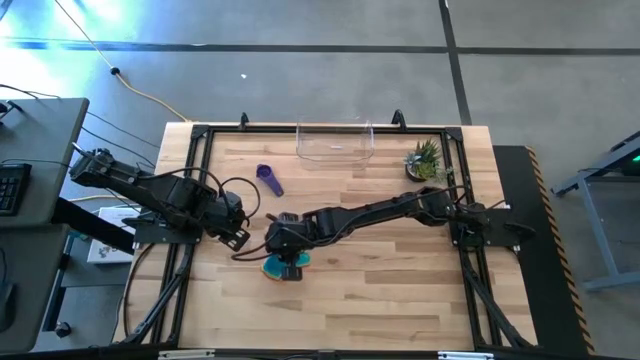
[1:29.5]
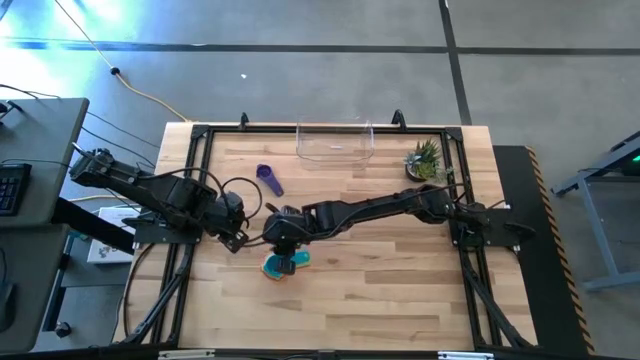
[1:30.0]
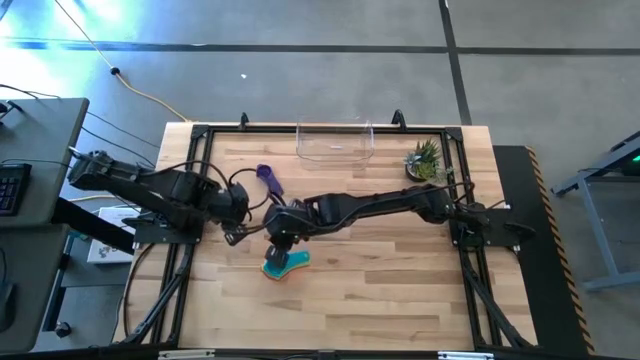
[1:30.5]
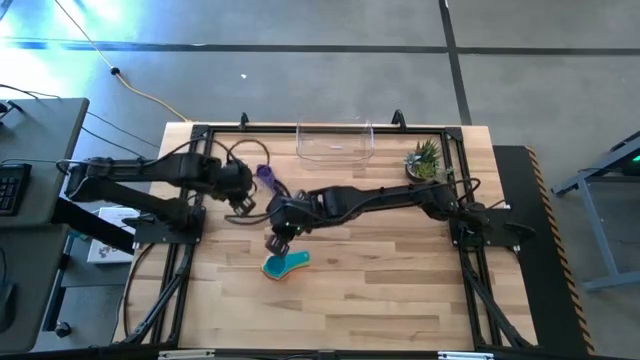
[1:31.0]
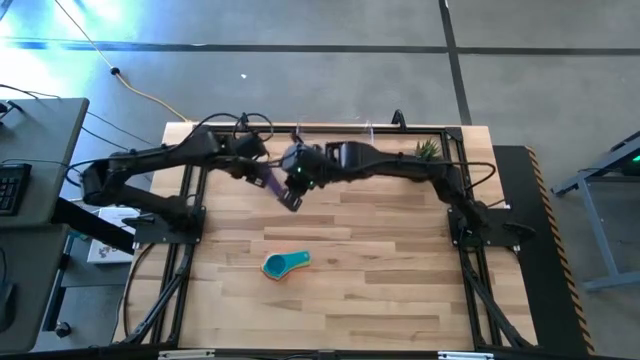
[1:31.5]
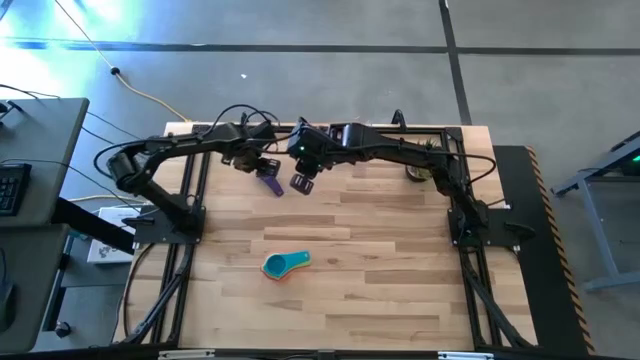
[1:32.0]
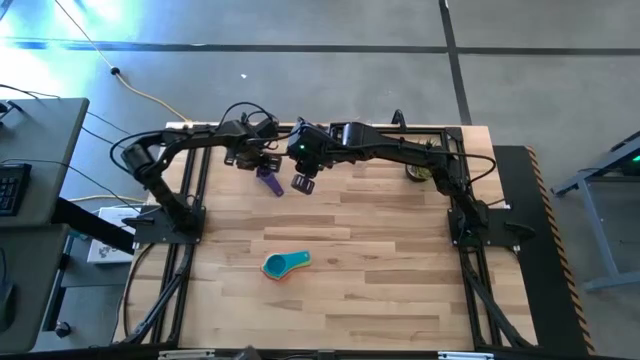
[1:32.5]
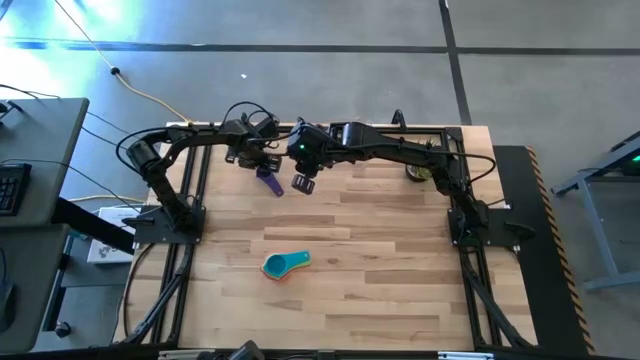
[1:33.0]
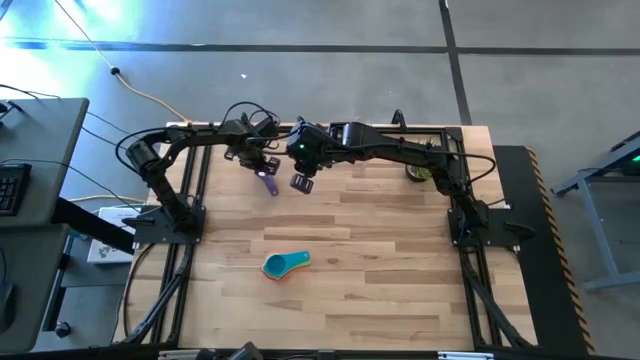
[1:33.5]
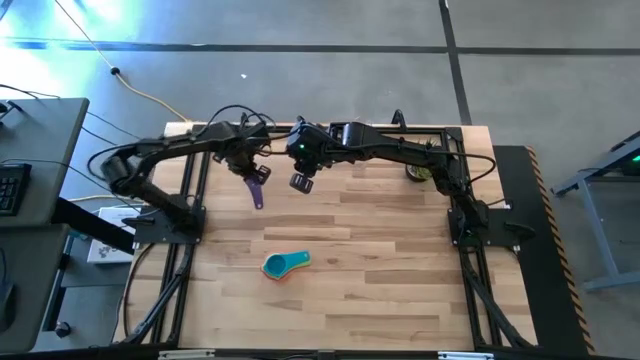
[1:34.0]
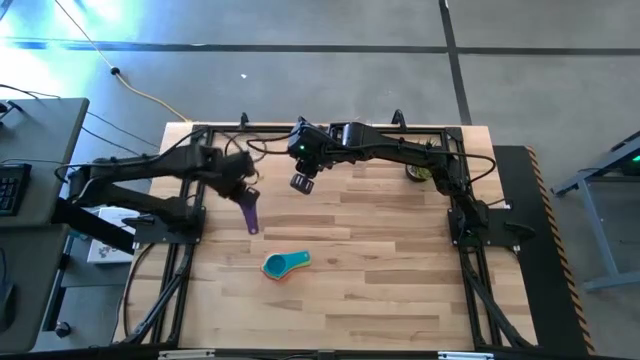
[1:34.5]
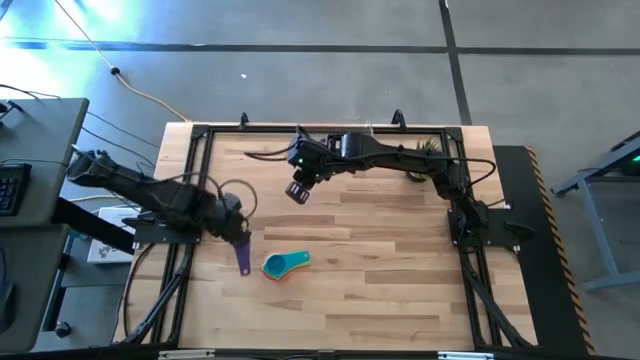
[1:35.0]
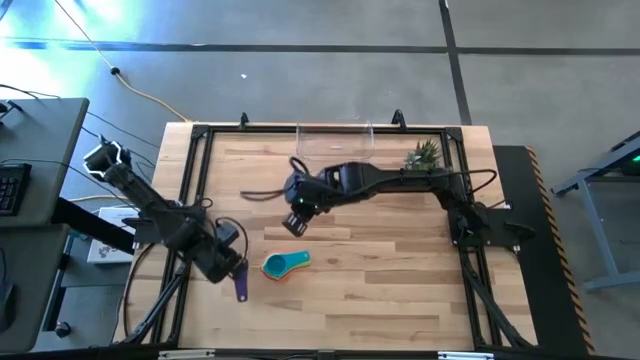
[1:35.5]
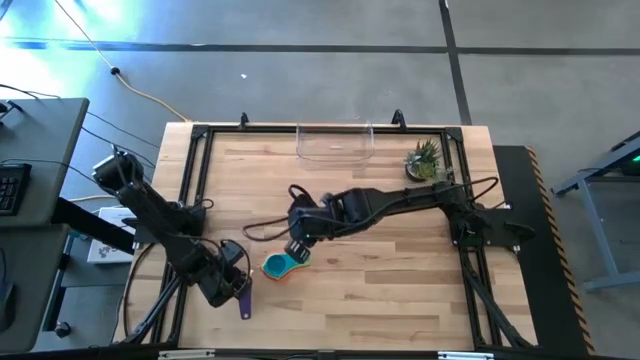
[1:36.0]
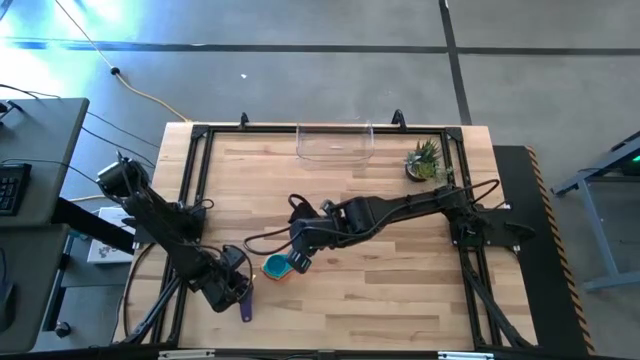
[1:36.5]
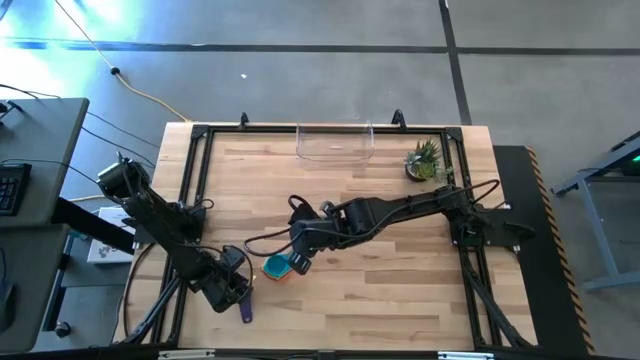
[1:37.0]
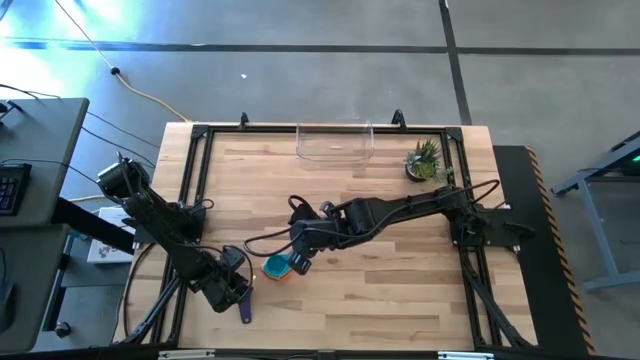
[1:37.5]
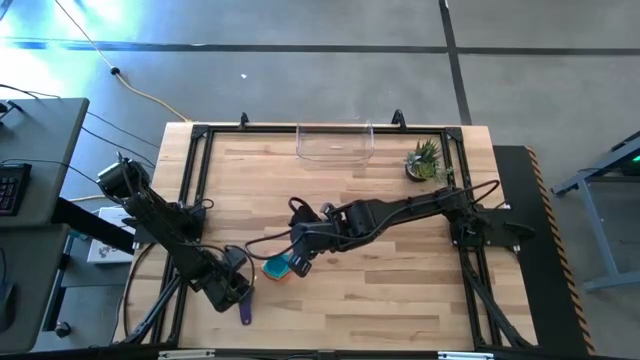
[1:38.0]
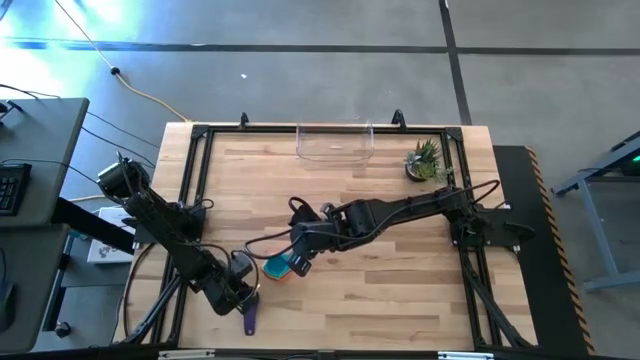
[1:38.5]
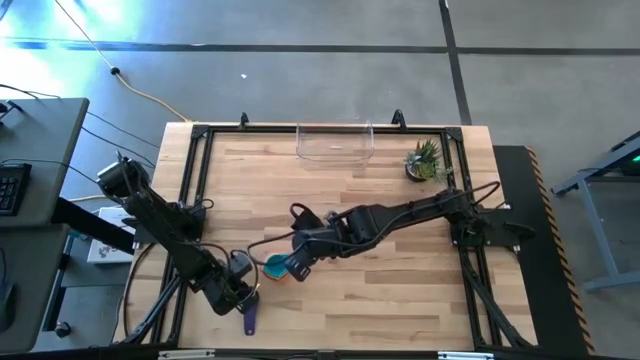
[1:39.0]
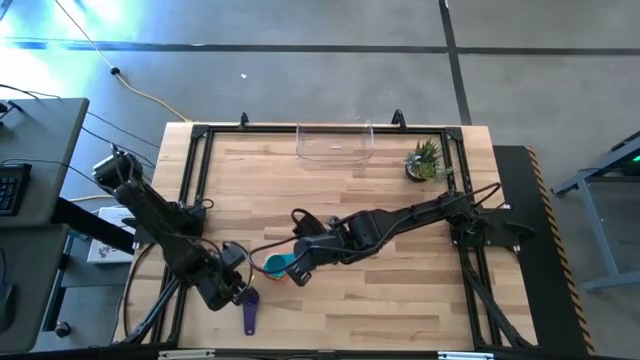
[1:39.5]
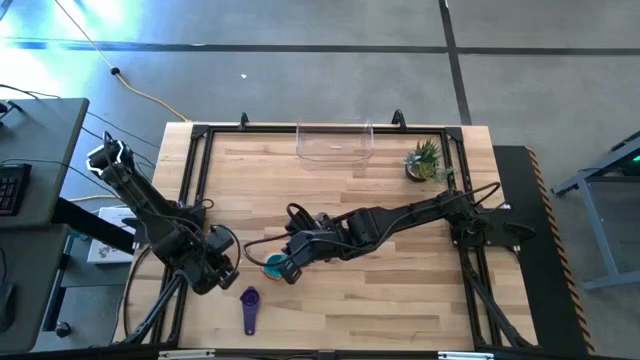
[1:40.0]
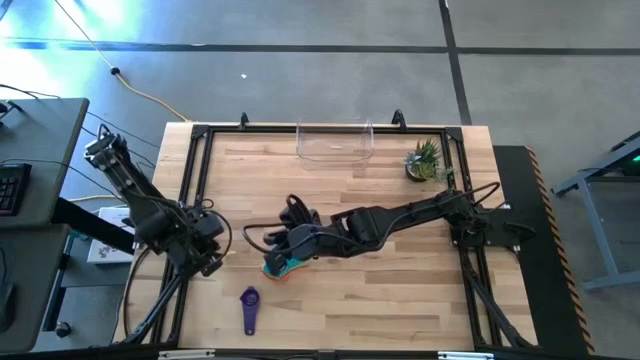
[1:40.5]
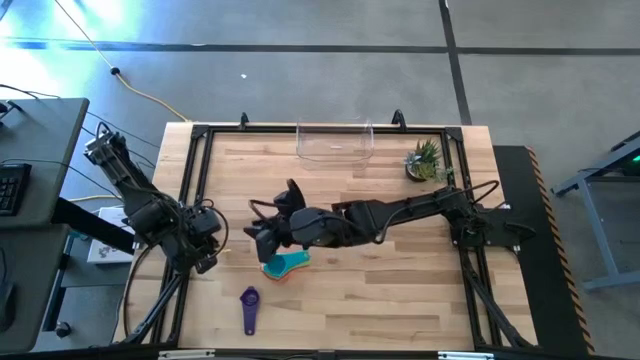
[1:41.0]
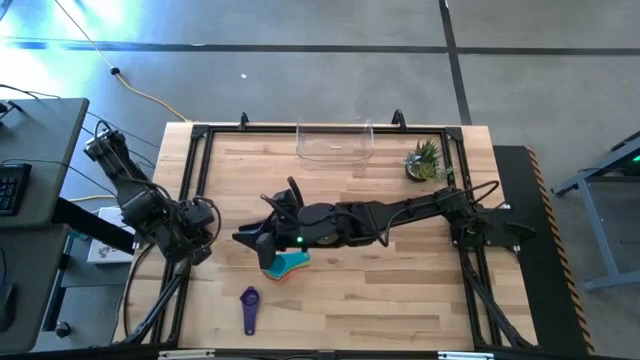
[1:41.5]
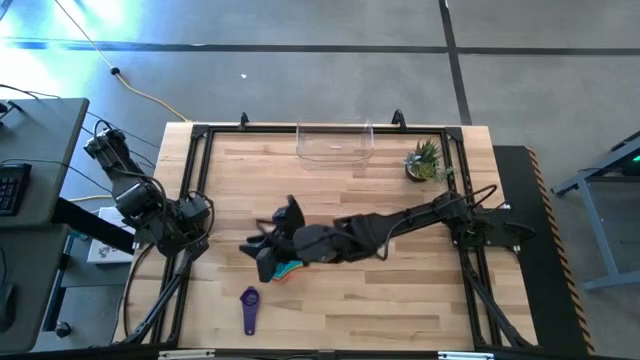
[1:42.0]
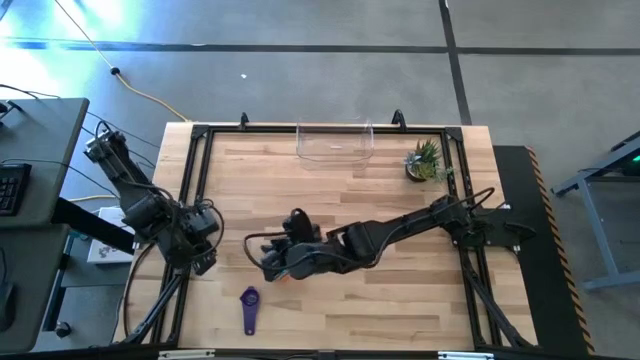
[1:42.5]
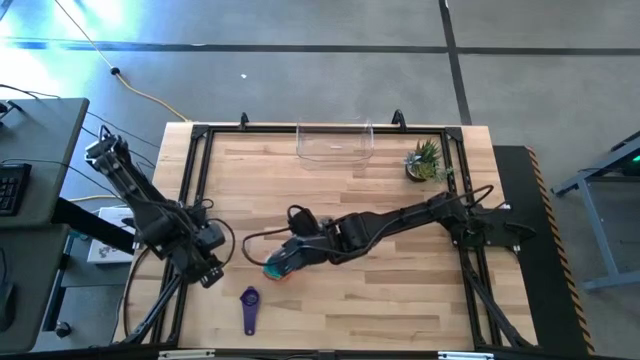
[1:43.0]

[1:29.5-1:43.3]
Task: Nest measuring cups in basket
Stack the dark blue measuring cup on top of the light blue measuring cup

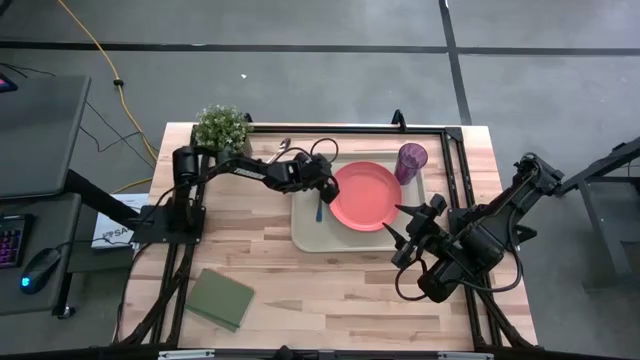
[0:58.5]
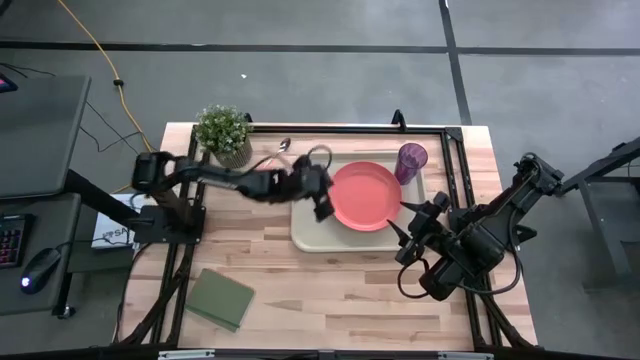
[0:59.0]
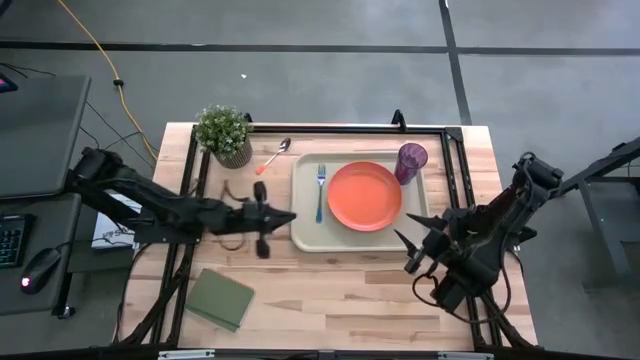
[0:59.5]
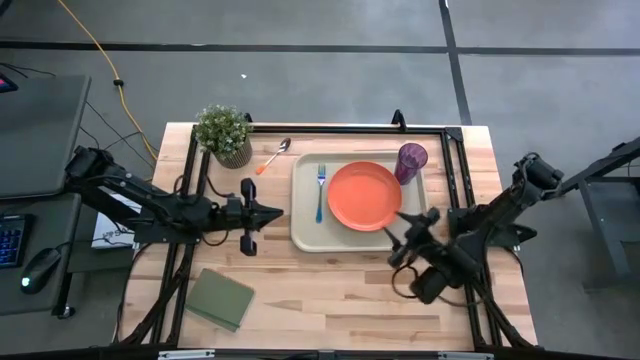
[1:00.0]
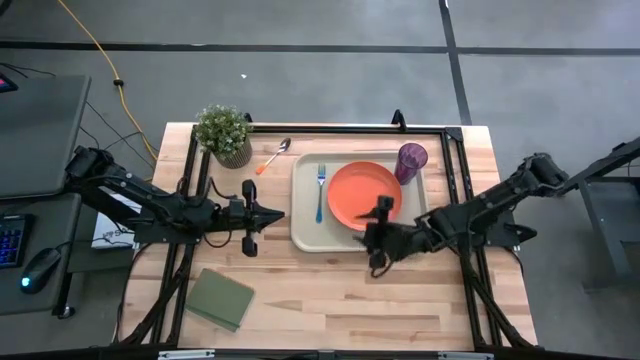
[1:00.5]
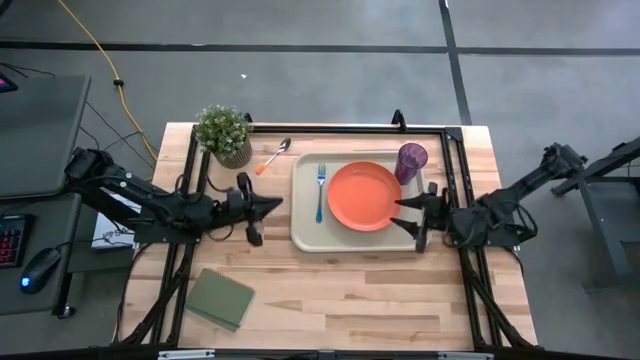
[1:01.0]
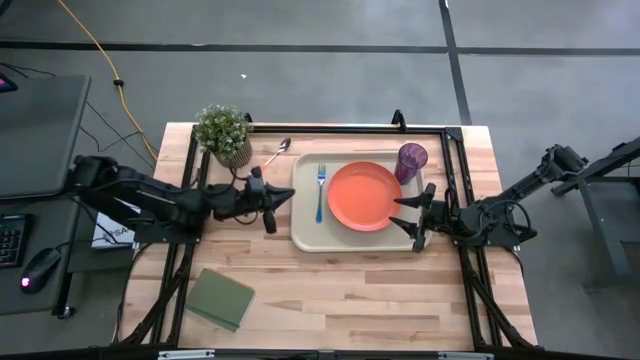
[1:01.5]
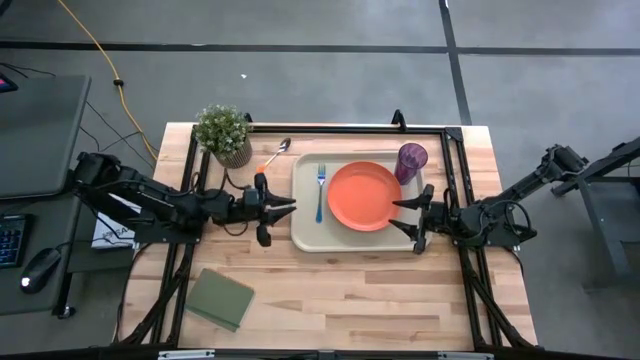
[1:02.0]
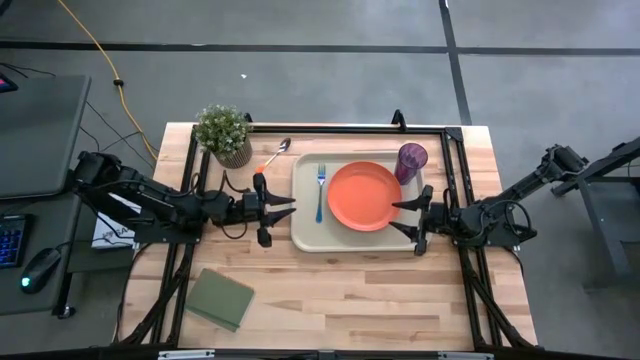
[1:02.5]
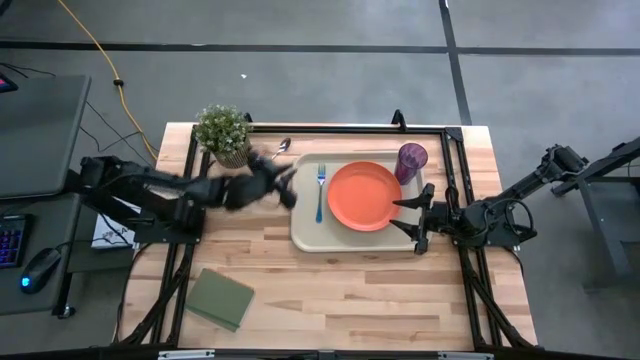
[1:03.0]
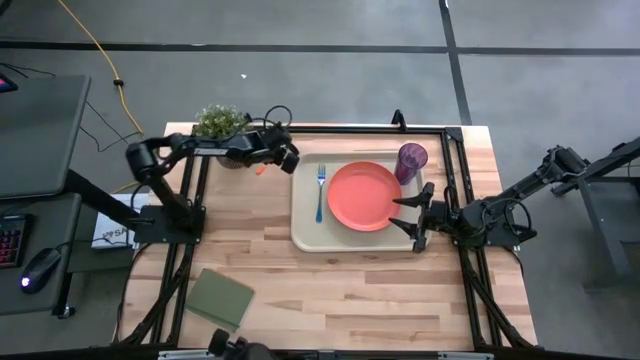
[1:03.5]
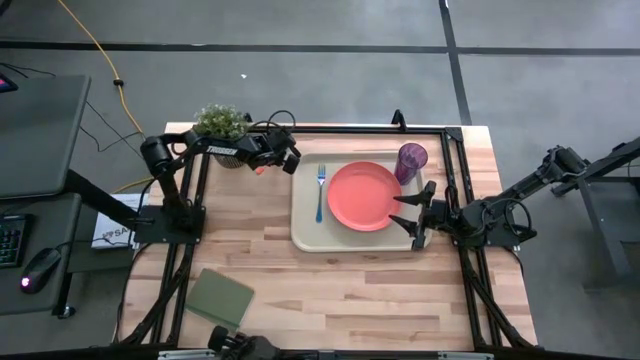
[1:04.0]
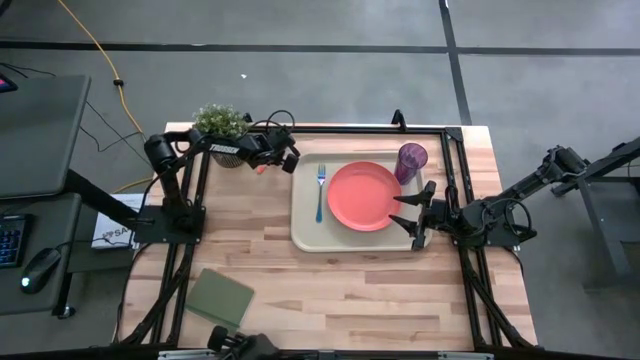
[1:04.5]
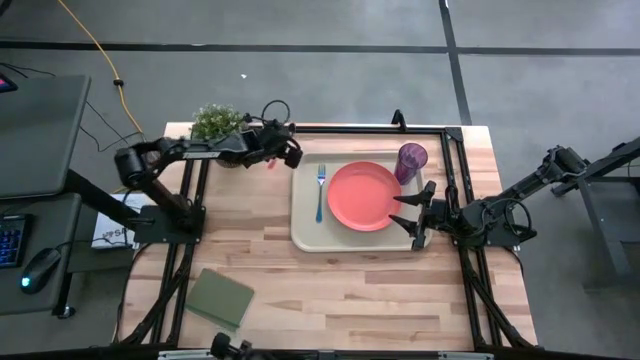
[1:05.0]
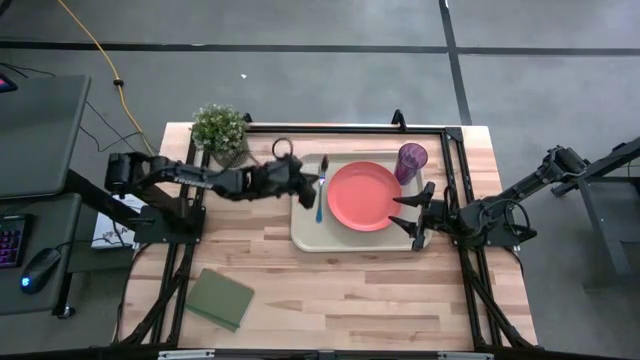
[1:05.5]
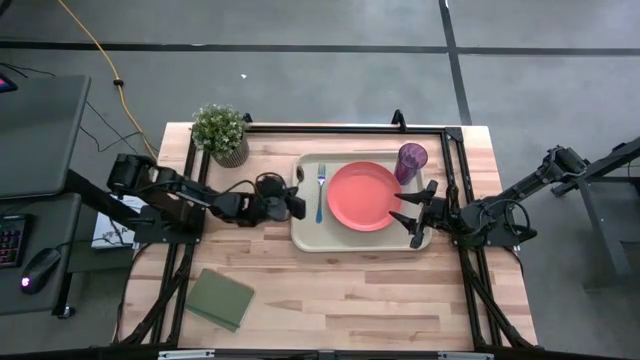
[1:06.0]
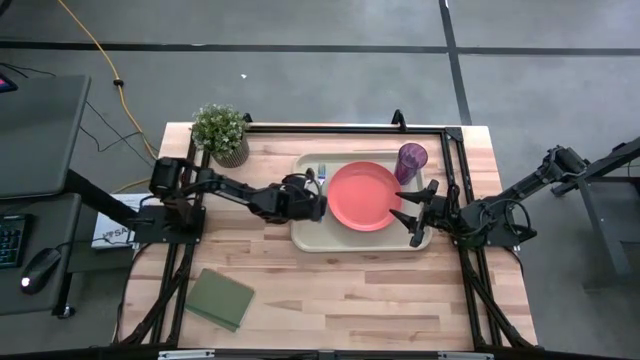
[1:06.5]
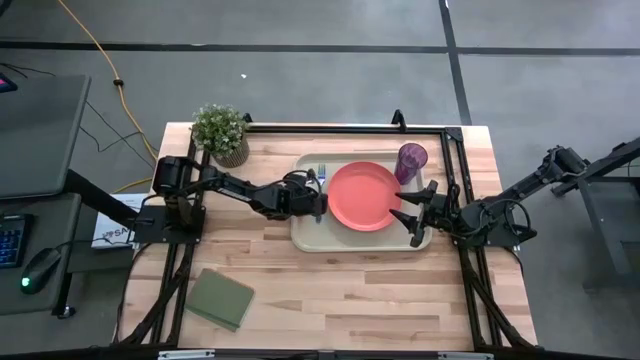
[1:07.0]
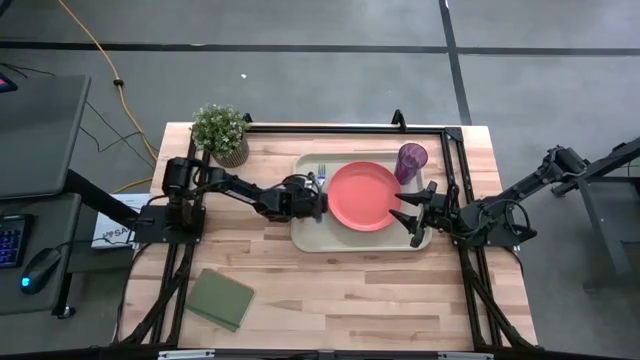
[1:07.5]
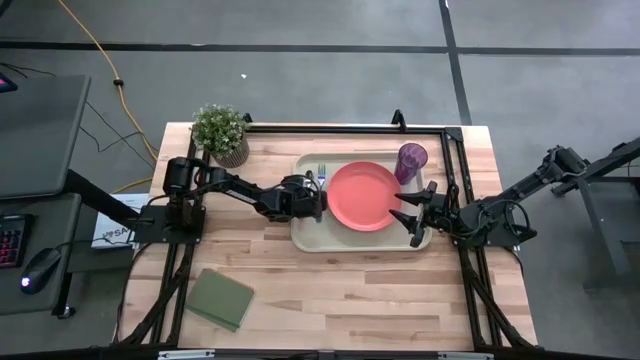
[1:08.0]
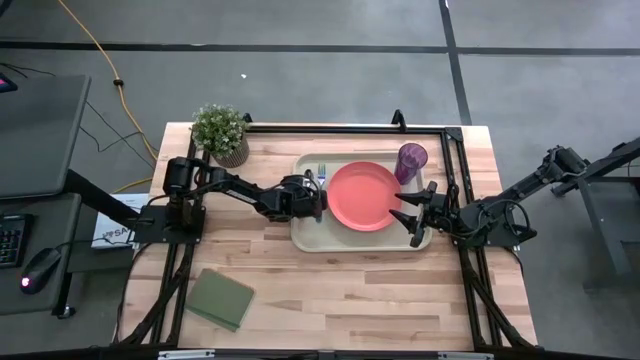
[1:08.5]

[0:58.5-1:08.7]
Task: Pick and place plate/cup/fork/spoon on tray
Put the orange spoon on the white serving tray to the left of the blue fork
